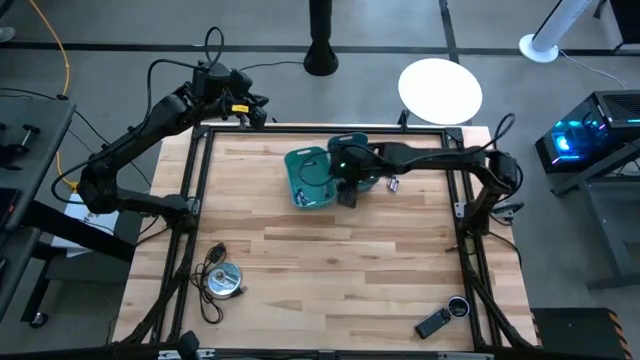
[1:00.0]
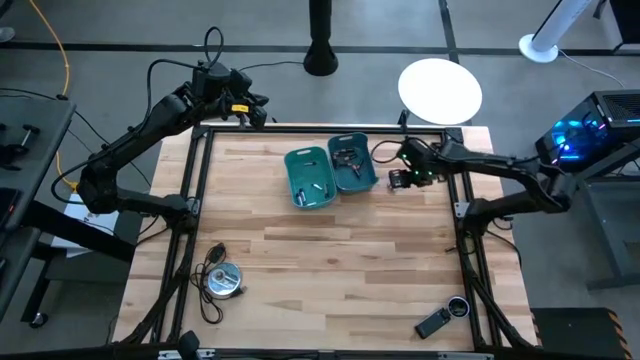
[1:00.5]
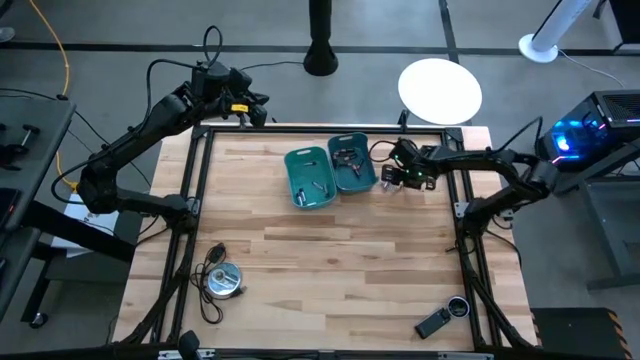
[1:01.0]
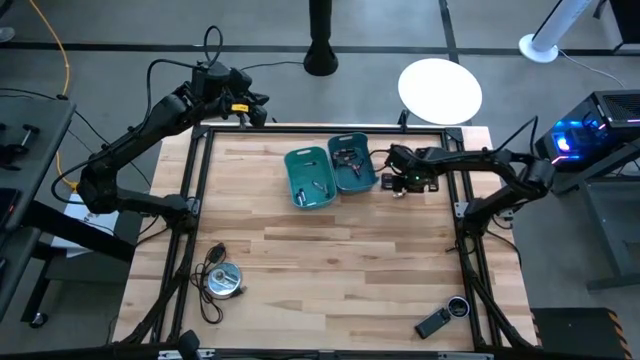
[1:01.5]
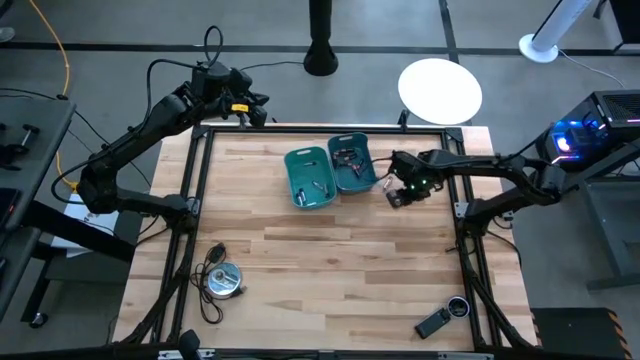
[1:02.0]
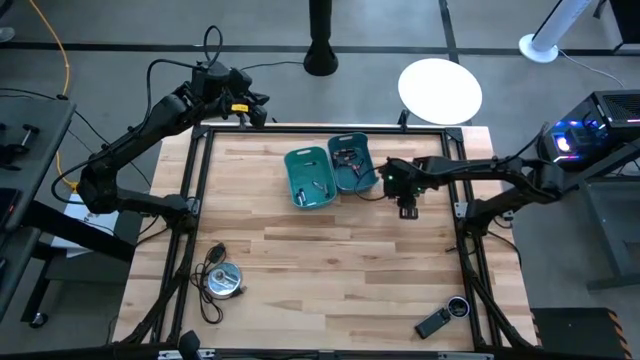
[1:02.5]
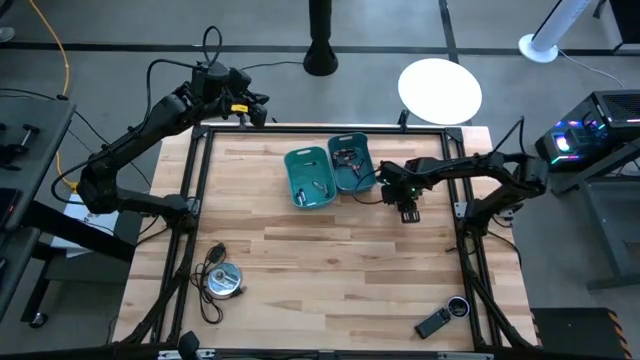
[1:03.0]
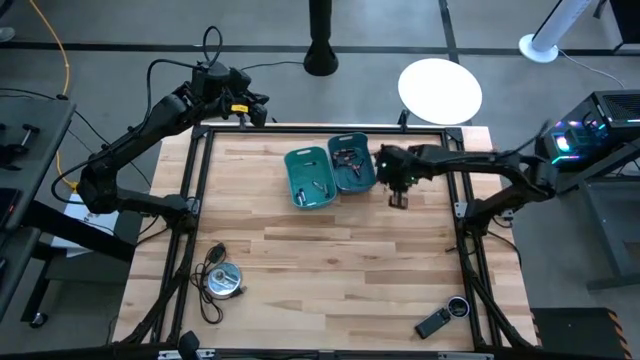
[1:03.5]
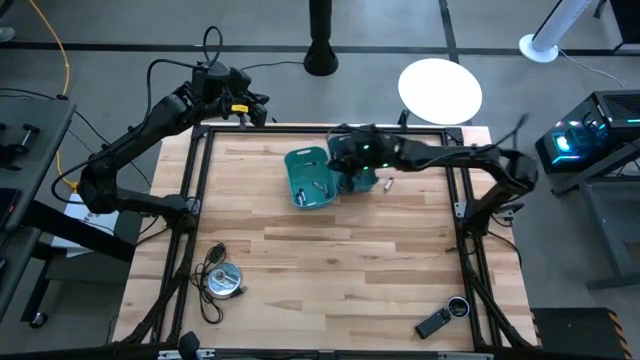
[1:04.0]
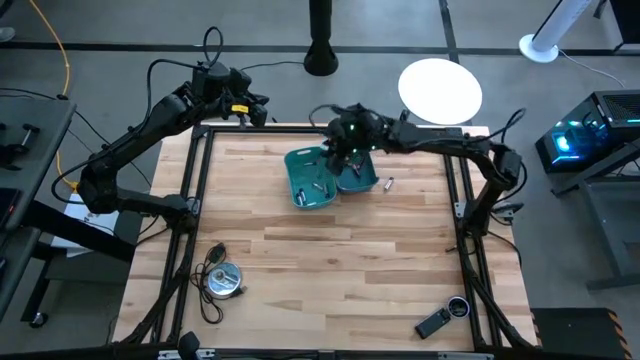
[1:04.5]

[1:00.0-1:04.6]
Task: Sort batteries
Put the silver battery into the green bin

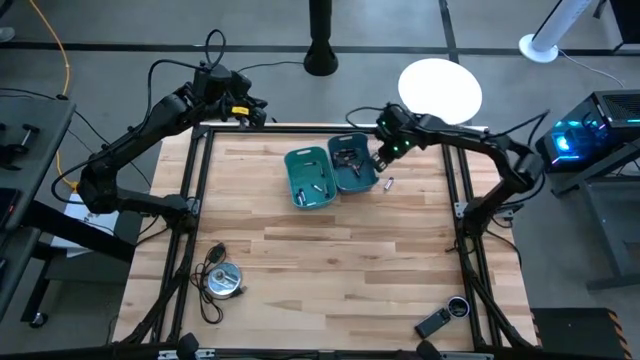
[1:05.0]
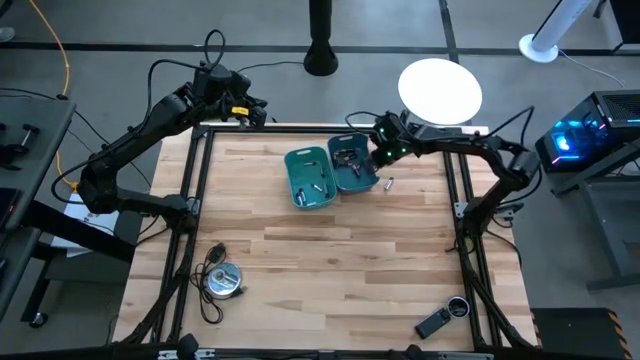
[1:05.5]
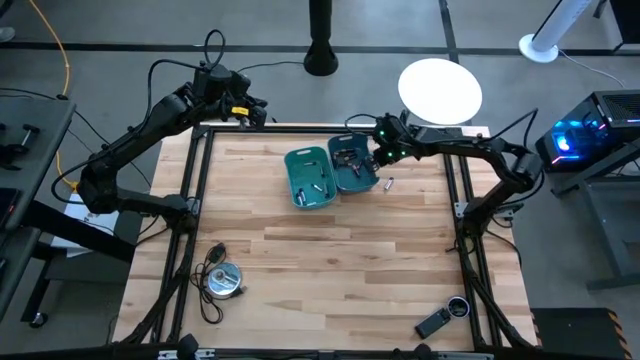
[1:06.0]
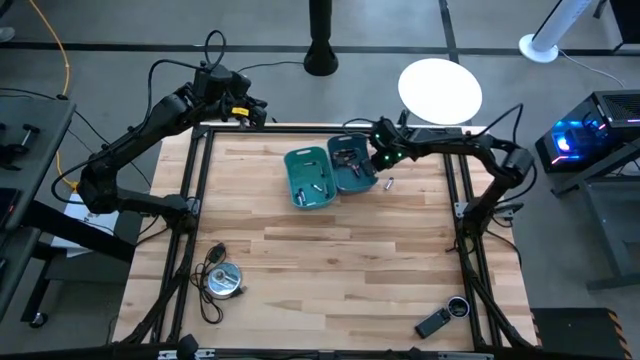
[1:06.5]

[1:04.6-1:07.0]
Adjust the blue bin

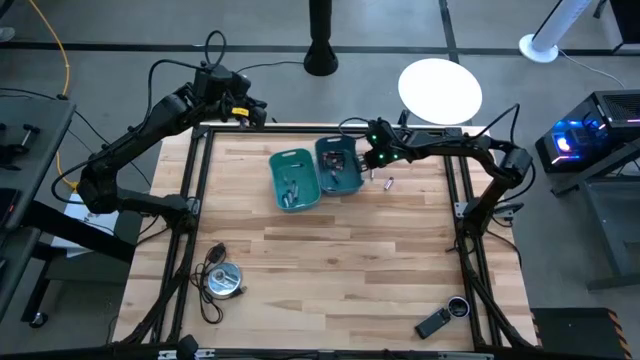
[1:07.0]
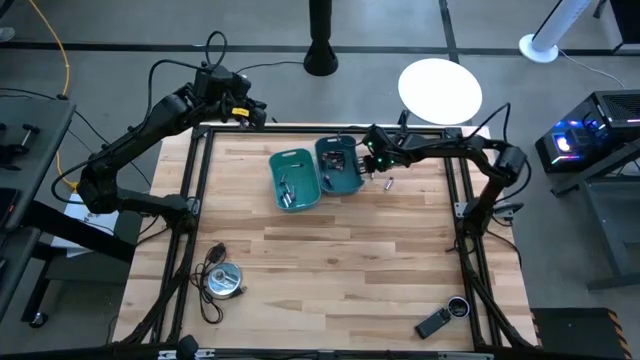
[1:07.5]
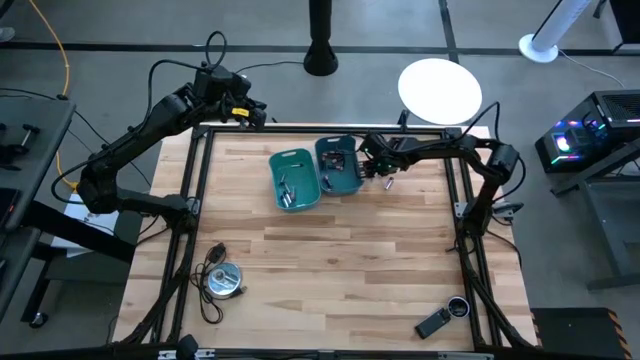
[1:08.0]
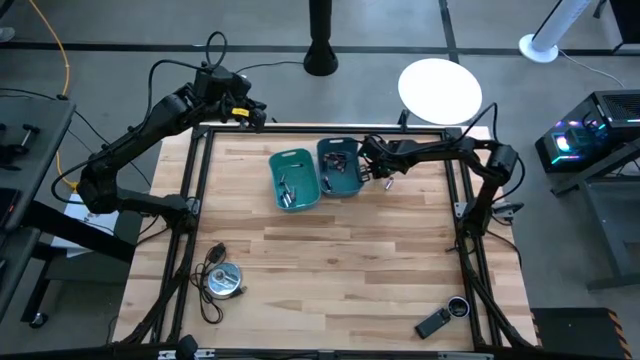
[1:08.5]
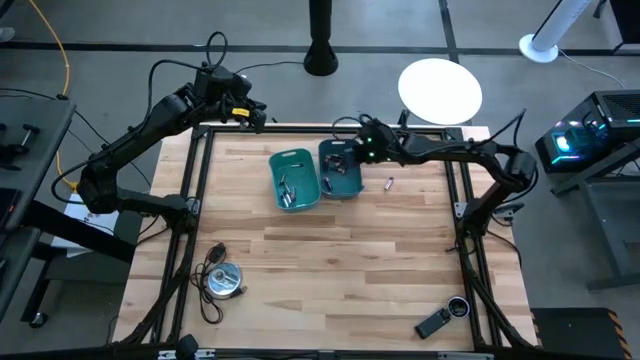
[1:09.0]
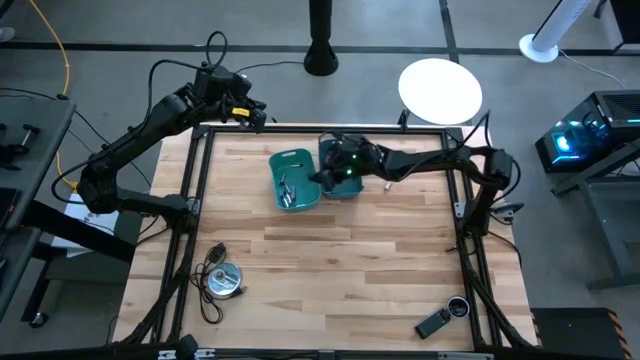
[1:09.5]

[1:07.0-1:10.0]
Put the silver battery into the green bin

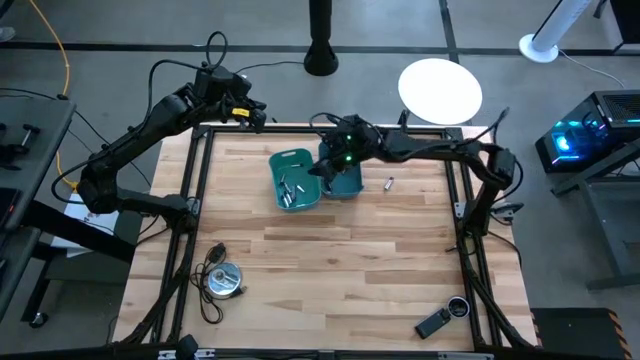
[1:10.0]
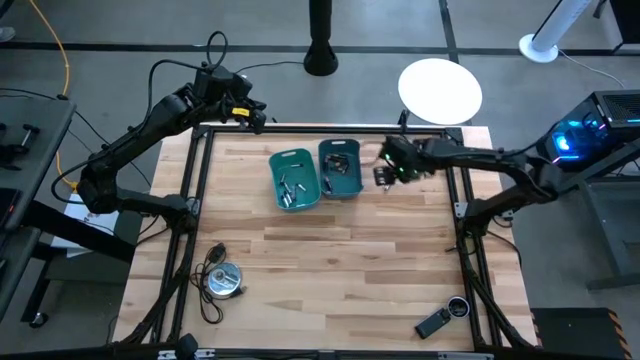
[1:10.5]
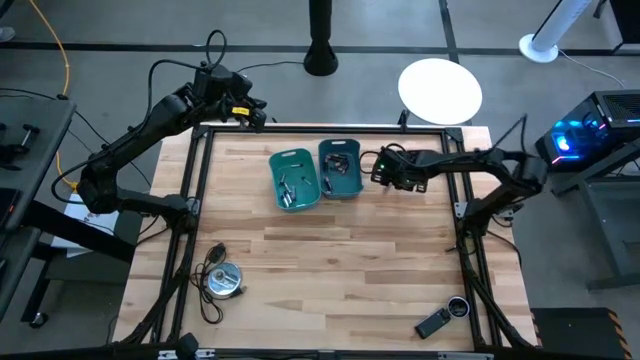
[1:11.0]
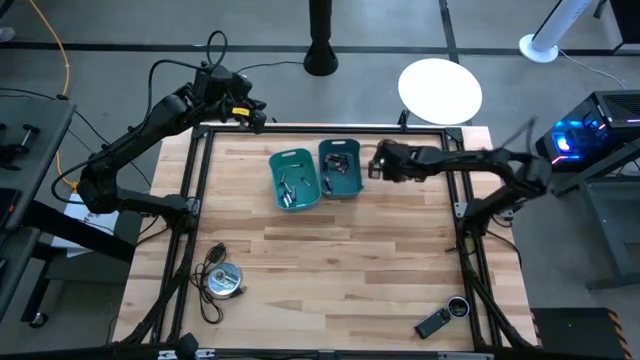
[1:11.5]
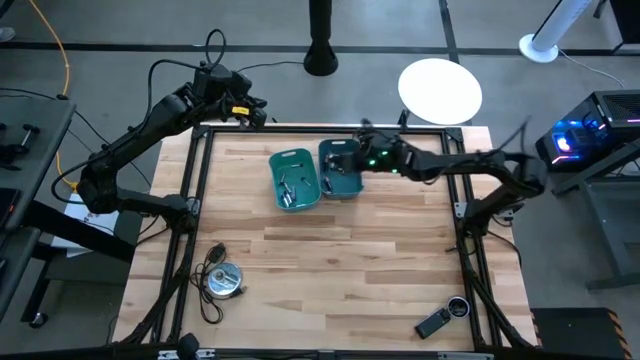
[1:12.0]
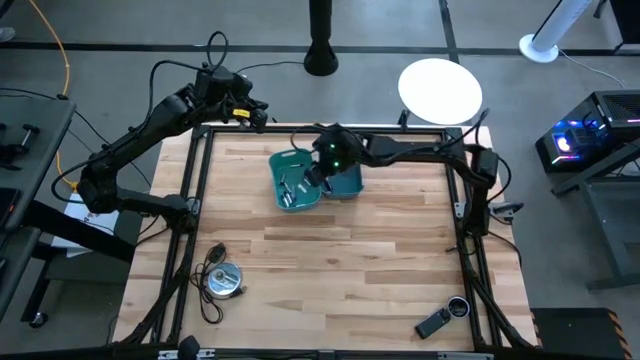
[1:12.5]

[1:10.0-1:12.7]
Put the silver battery into the green bin

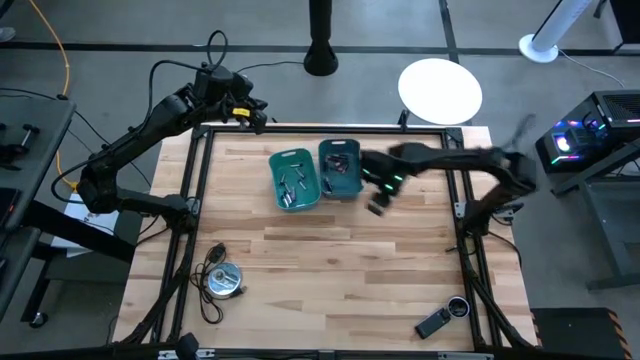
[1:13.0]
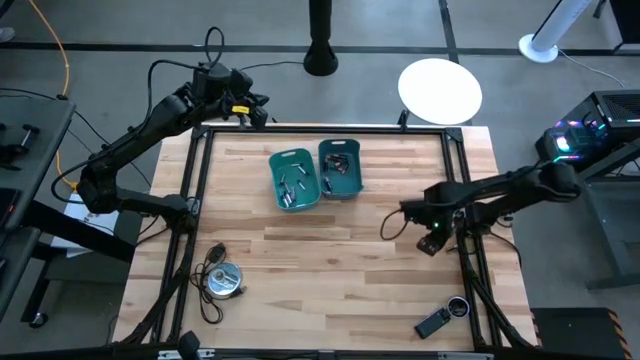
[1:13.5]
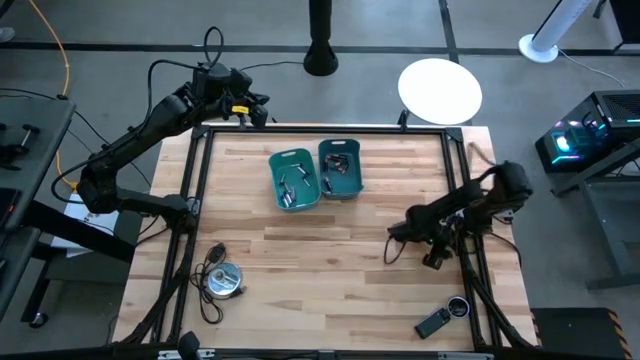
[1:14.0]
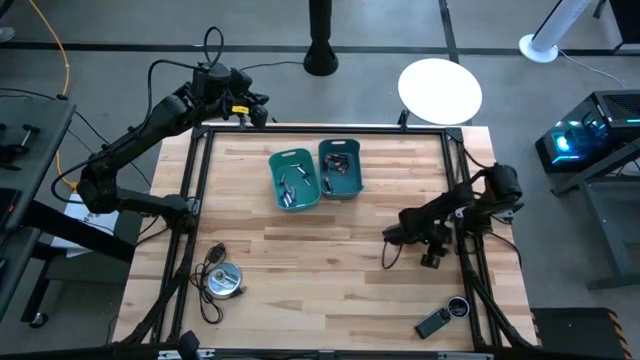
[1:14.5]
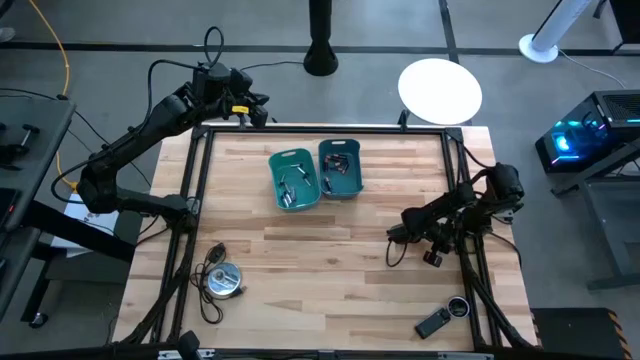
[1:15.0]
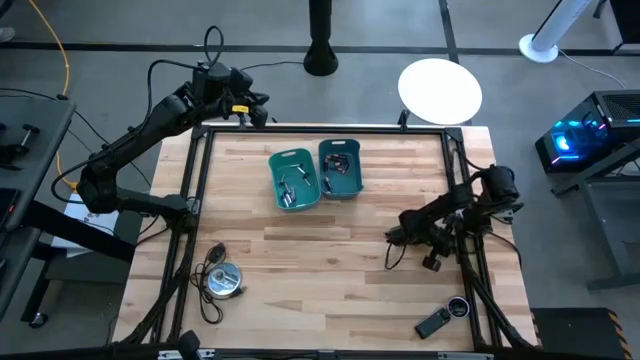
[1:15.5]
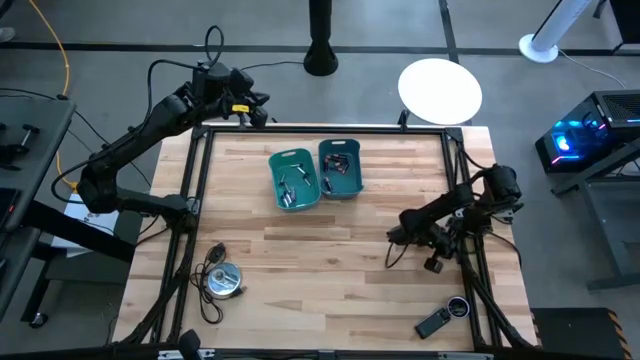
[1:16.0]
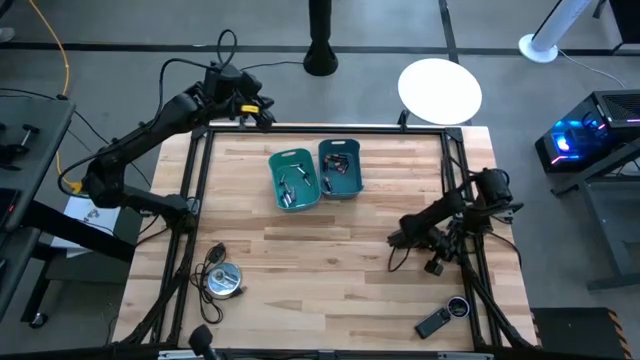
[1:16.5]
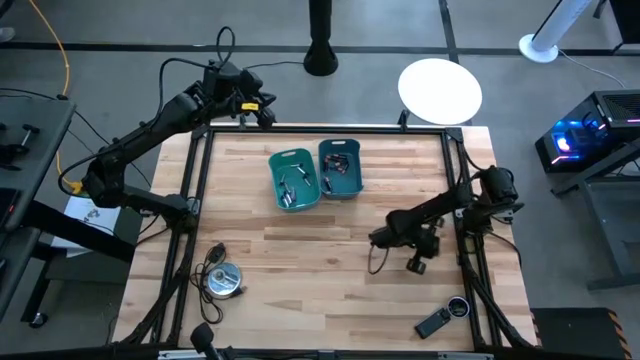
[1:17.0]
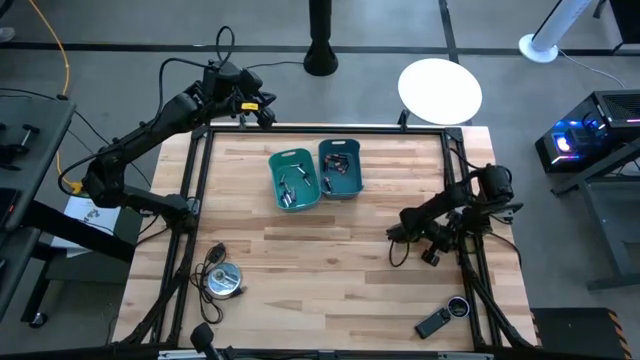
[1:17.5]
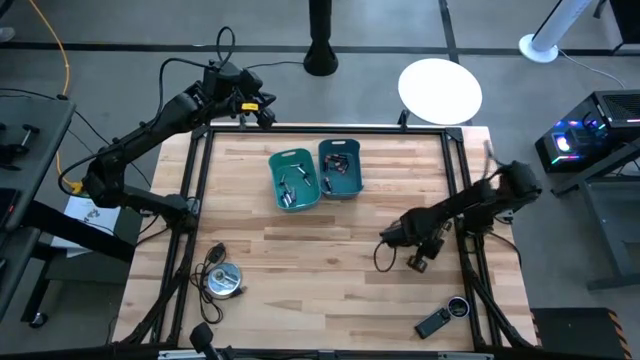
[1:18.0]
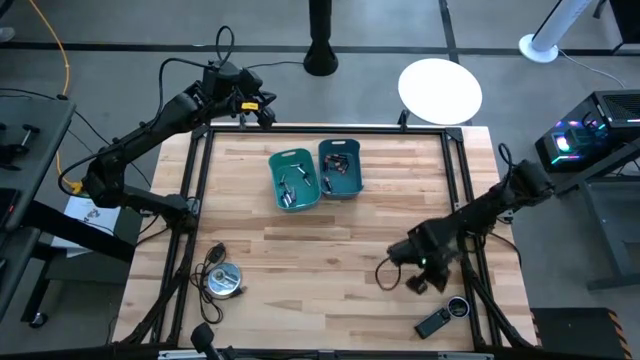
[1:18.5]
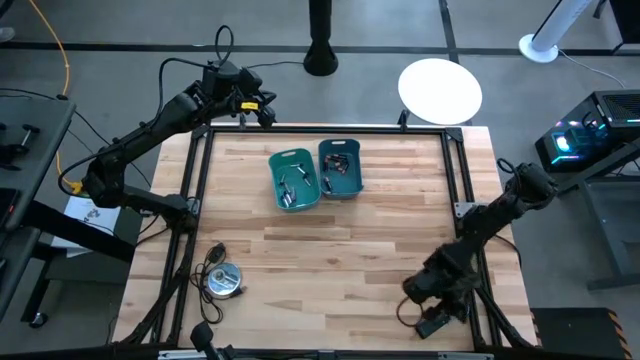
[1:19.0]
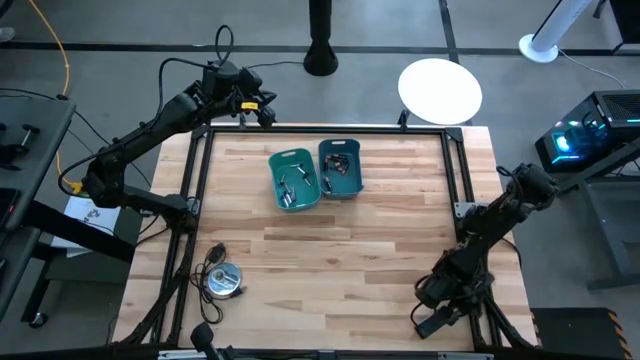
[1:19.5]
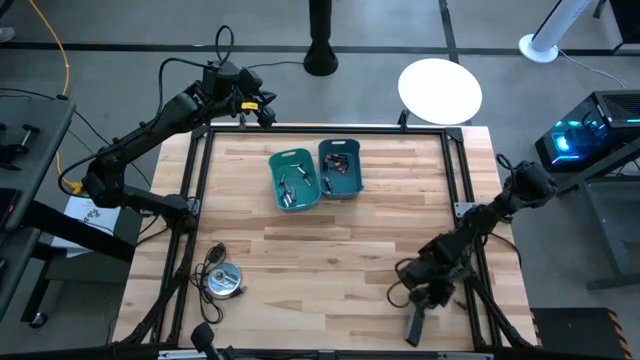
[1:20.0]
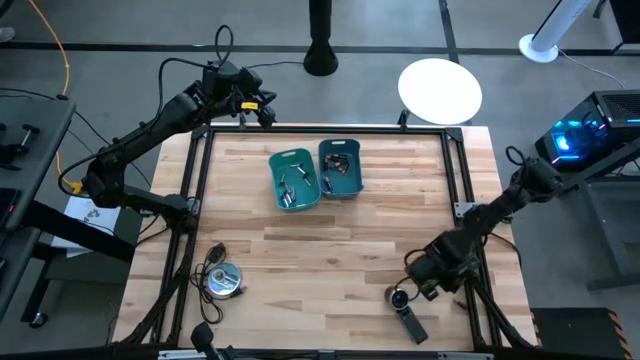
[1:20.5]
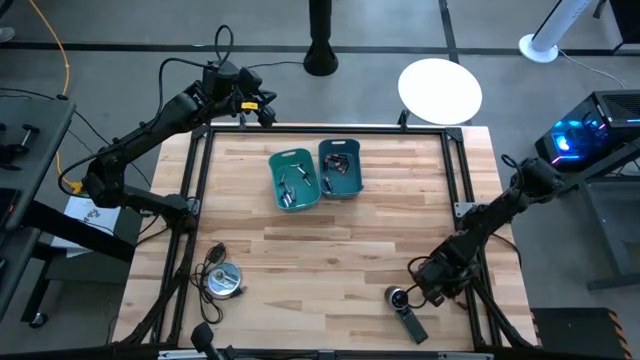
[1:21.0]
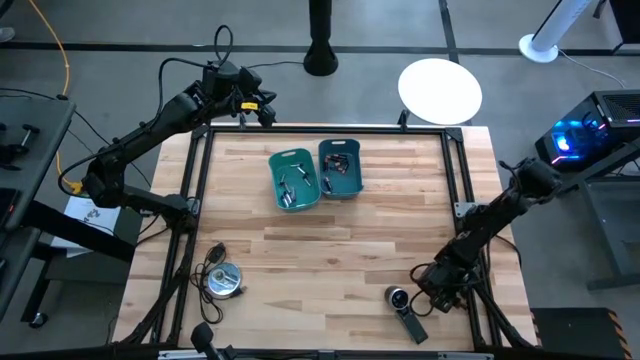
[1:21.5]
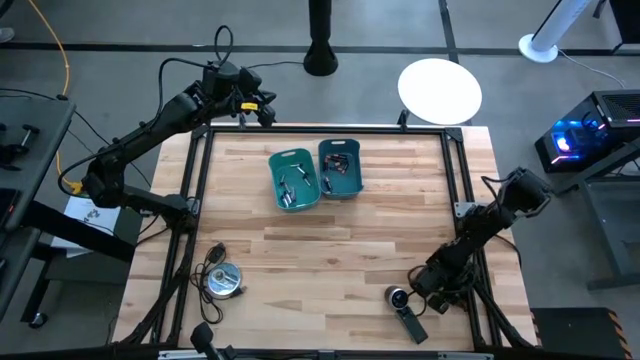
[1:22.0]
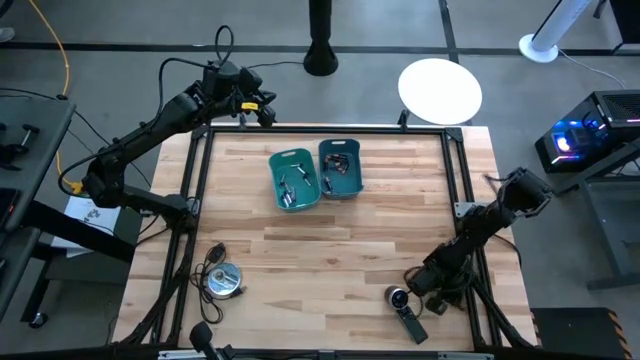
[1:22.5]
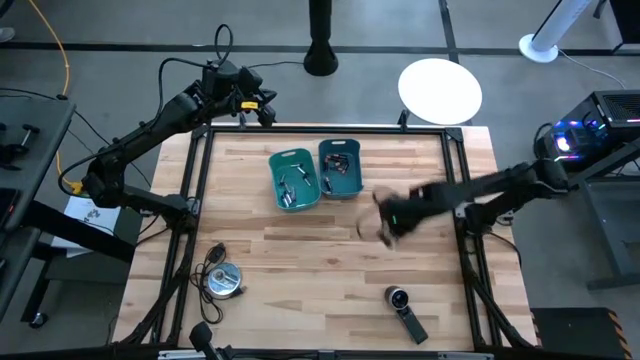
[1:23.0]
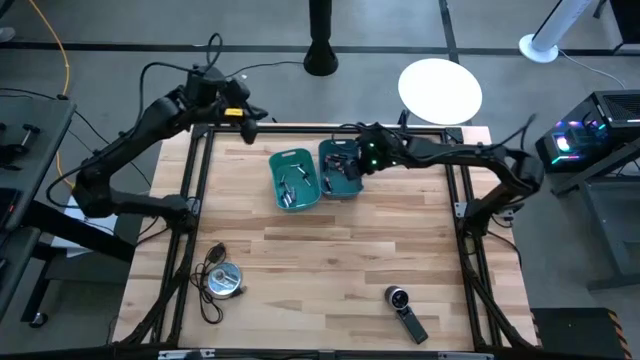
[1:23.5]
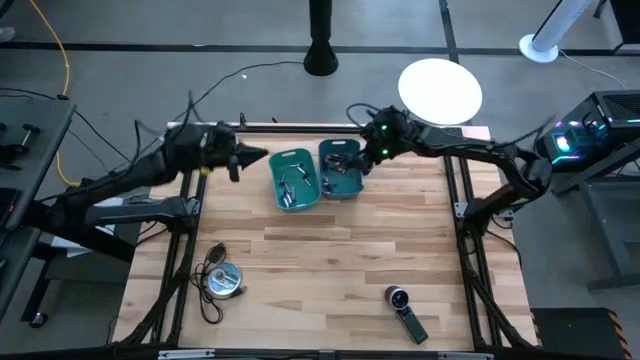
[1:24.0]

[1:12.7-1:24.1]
Put the black battery into the blue bin
